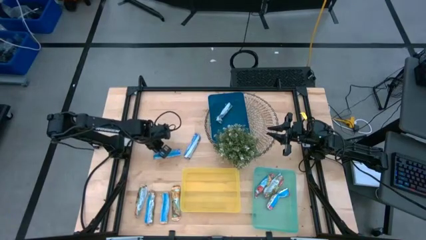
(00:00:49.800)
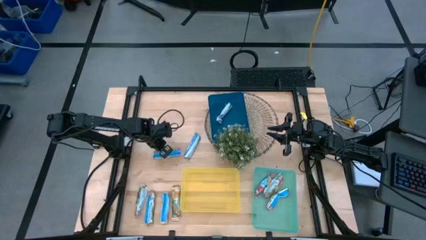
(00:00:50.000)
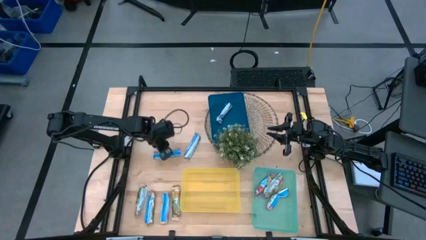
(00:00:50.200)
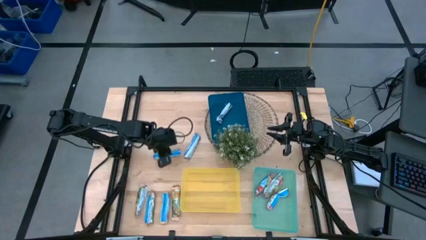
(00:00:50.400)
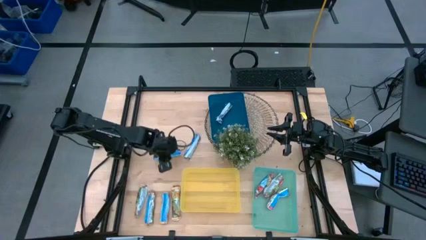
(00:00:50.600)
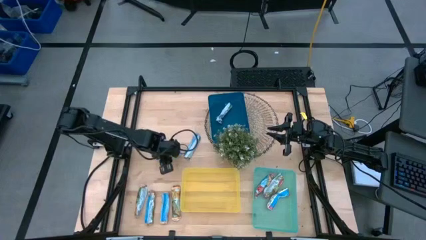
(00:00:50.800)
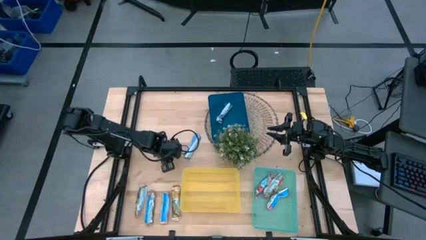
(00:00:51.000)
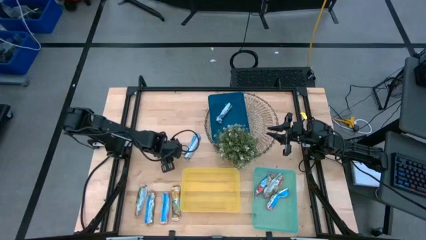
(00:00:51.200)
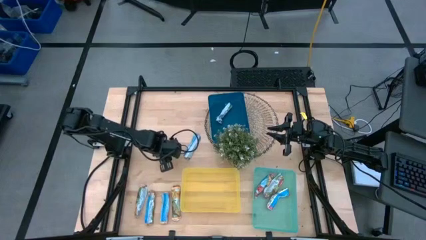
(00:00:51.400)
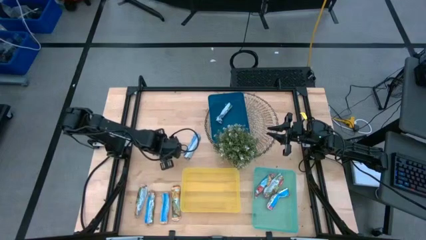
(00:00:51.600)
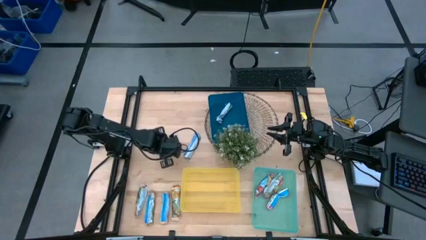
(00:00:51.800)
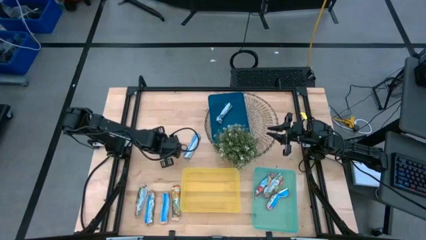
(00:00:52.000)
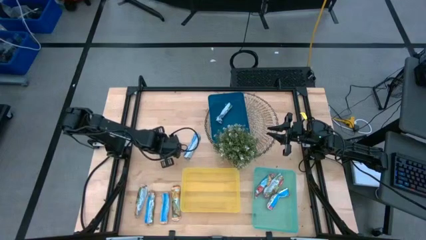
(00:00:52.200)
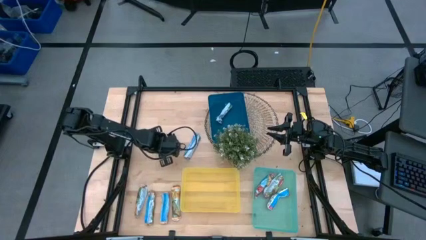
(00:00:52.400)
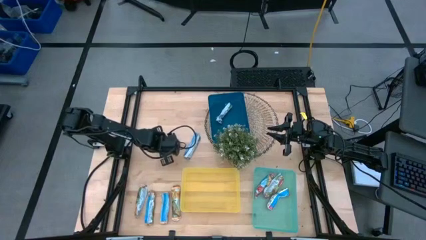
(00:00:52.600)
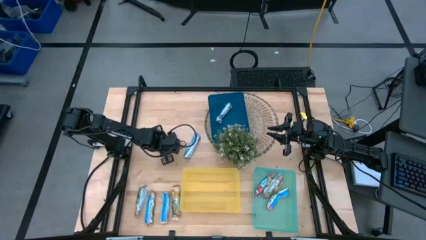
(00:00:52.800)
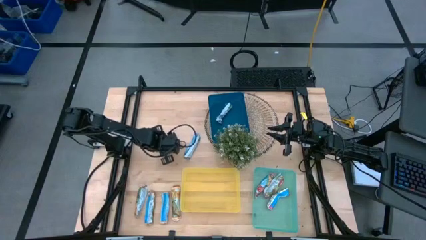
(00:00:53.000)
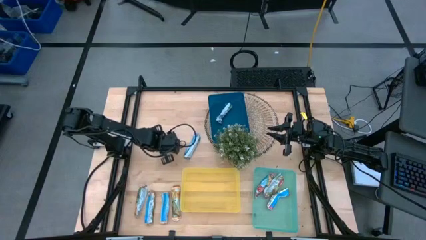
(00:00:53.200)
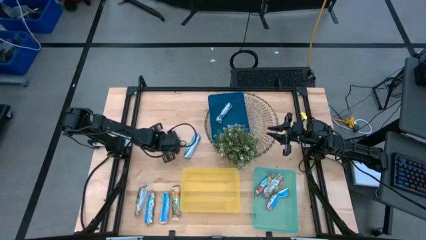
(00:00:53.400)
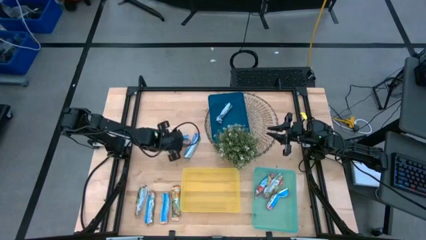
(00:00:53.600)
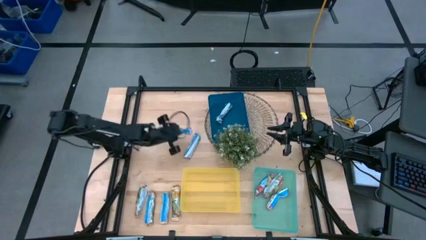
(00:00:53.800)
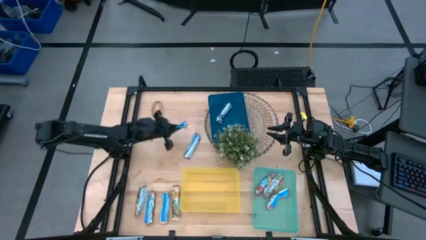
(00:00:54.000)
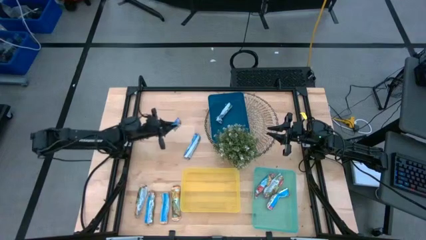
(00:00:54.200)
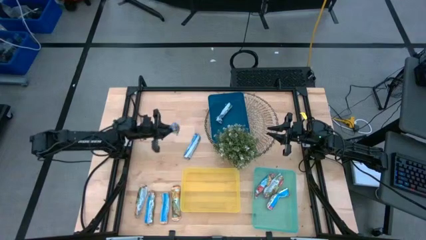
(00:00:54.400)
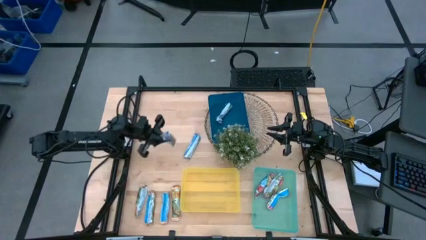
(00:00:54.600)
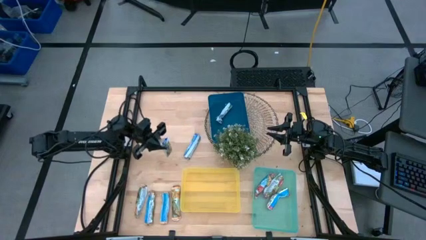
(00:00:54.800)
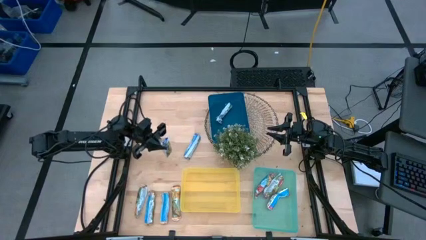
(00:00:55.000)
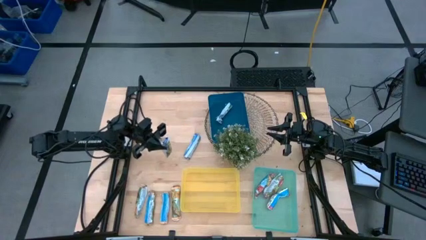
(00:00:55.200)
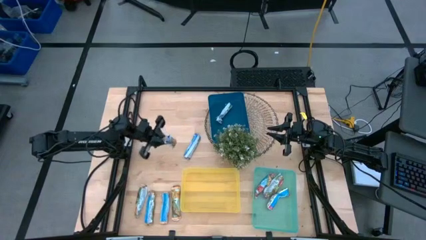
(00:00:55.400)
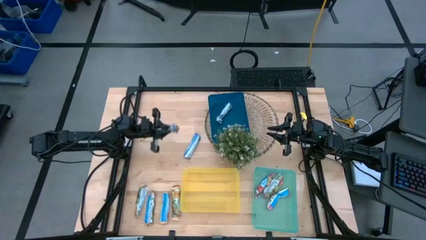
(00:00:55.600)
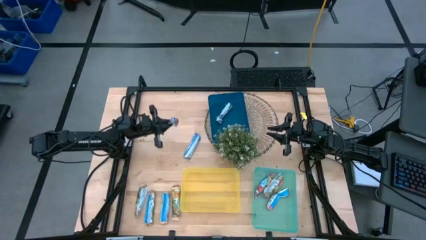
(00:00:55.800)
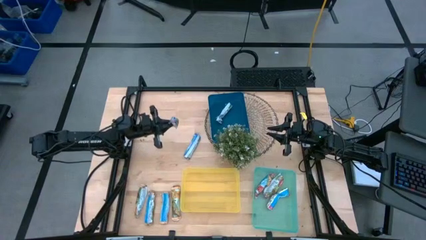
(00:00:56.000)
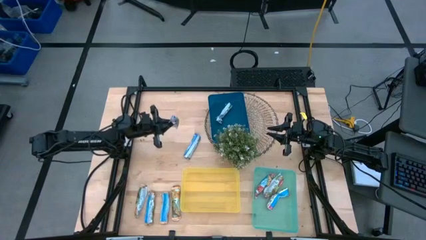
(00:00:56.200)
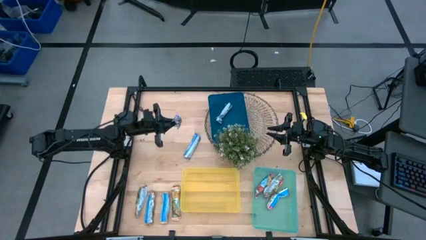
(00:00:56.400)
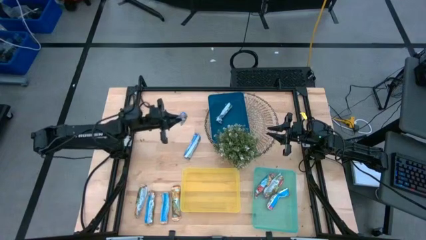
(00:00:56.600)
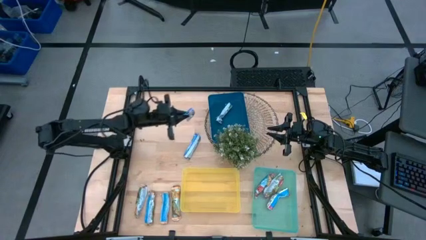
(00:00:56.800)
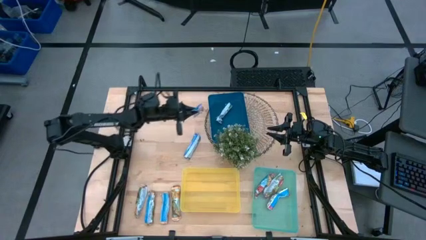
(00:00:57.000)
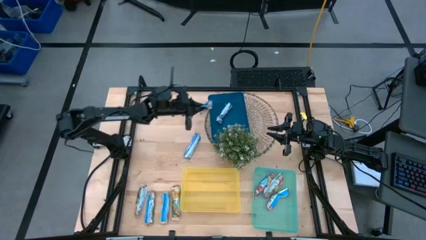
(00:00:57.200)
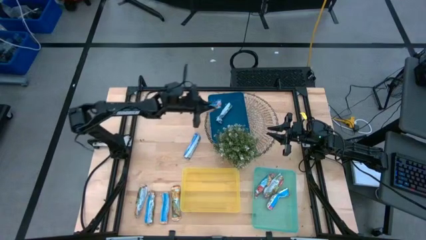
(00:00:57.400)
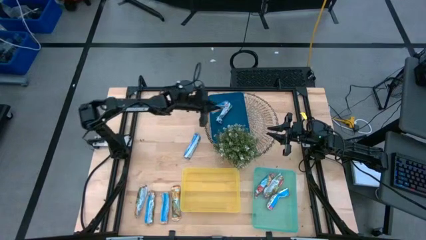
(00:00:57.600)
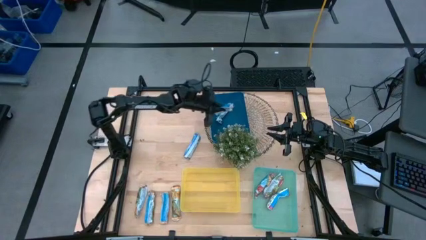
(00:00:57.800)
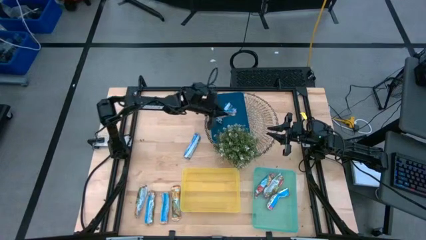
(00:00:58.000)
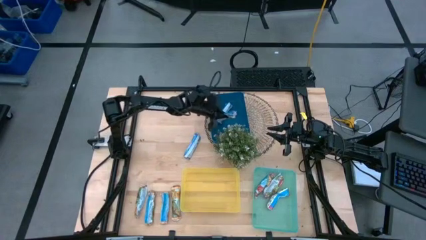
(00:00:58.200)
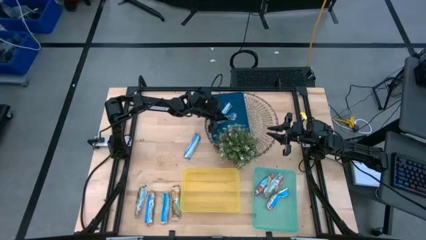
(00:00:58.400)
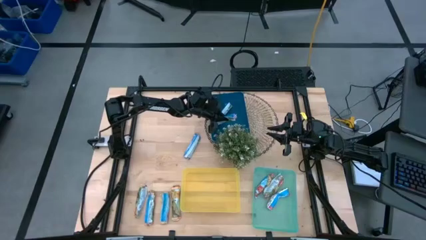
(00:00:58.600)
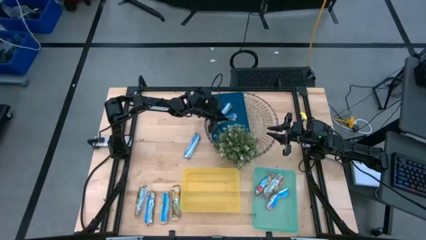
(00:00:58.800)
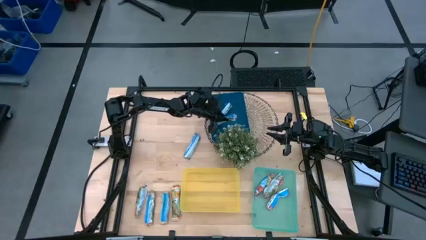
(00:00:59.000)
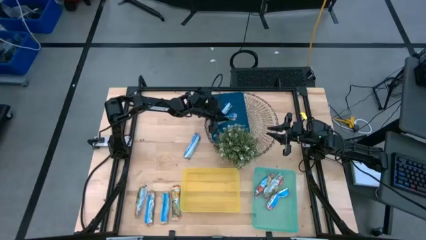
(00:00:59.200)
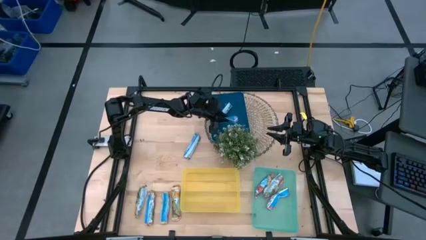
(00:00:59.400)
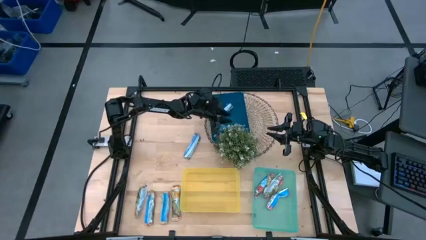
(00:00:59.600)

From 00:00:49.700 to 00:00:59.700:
Task: Pick and place Granola Bars by type
Put the blue granola bar into the blue bin
